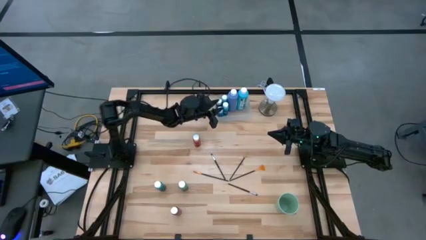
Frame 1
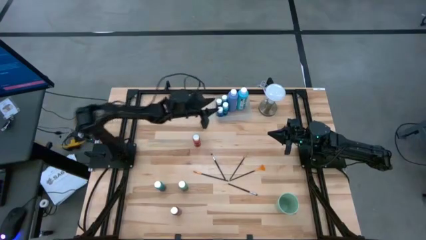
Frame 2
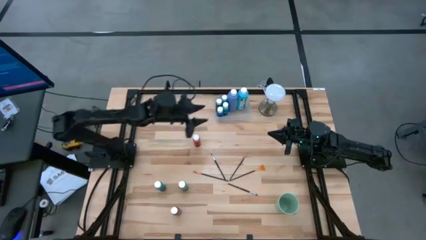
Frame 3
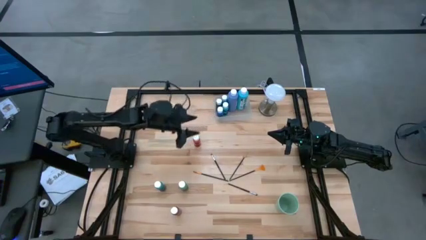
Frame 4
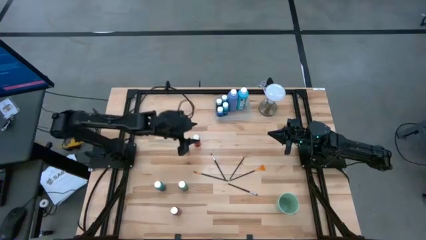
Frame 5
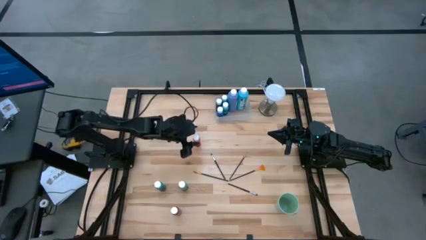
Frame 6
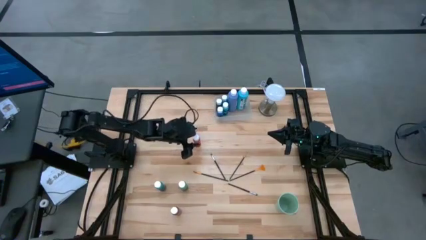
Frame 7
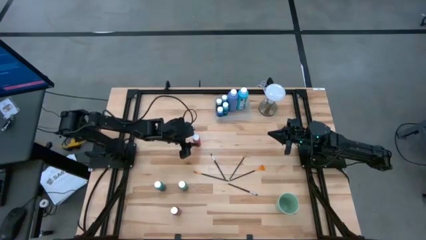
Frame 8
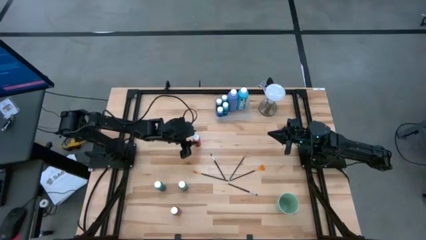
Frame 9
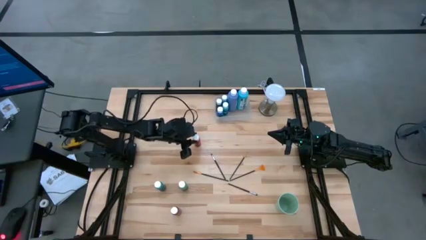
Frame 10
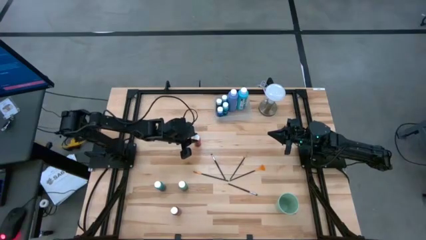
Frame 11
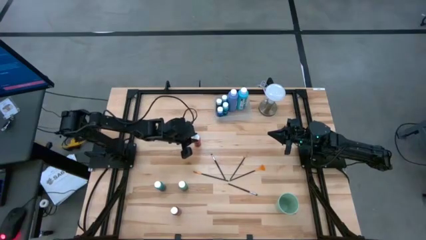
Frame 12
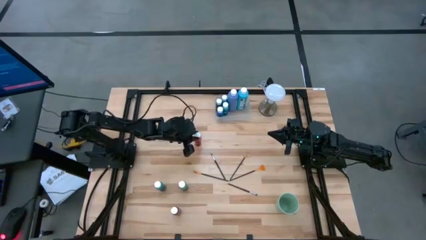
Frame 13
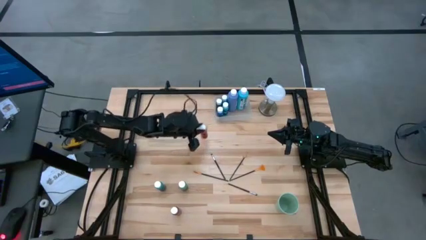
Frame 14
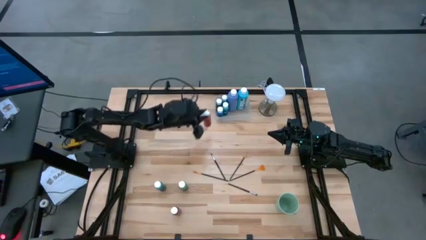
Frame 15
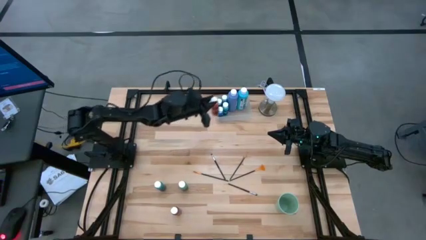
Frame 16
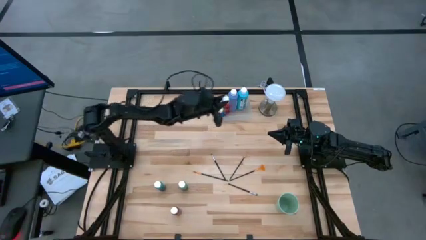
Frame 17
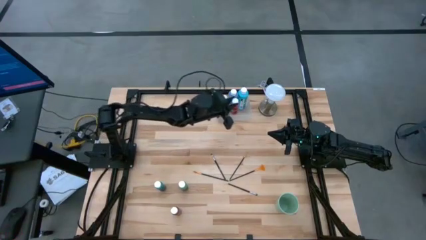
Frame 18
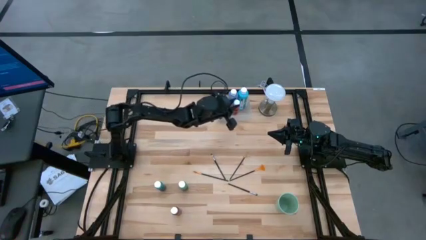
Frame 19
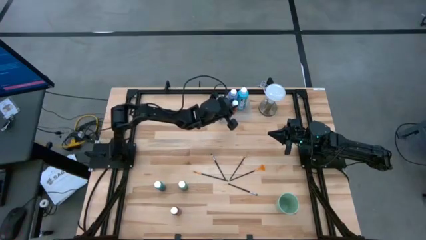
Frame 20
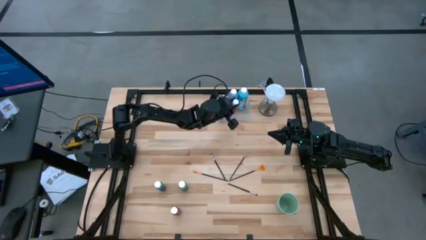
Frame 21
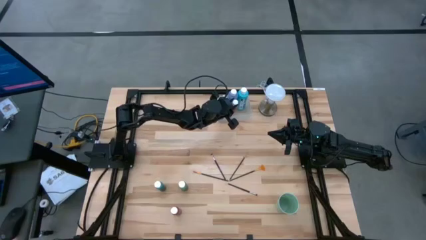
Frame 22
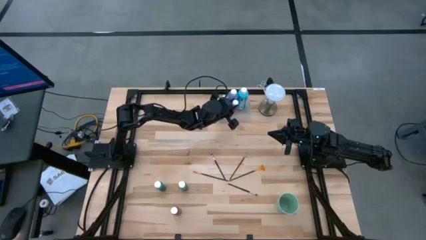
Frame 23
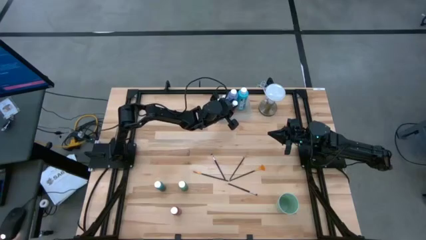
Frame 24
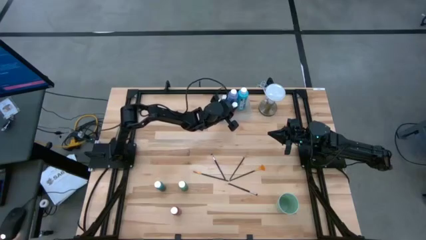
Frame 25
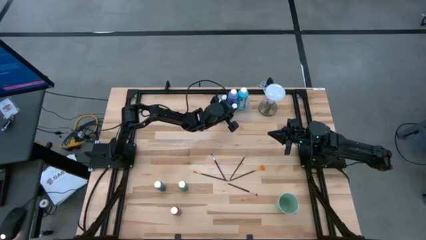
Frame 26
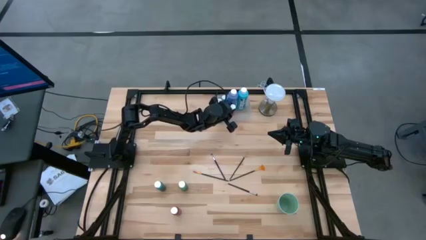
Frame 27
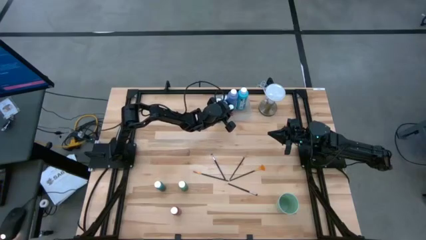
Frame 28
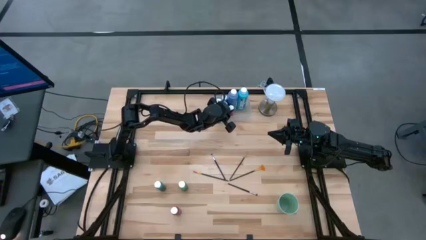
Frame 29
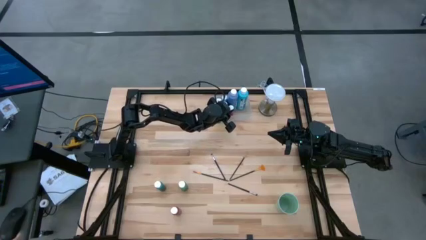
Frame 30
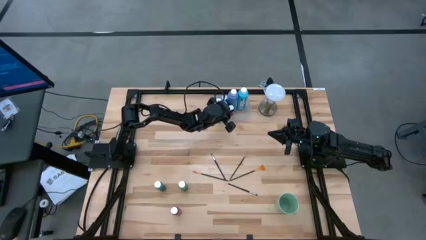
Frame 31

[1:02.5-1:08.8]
Task: Pick & Place Paint Supplies
Put the orange paint bottle into the transparent bin

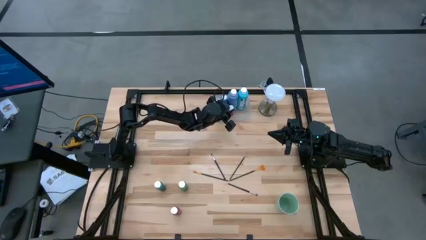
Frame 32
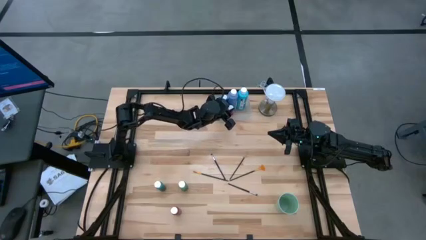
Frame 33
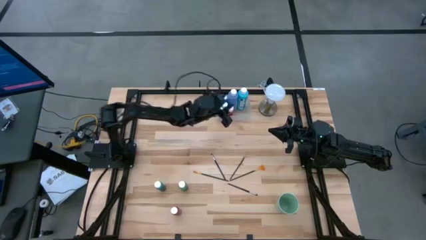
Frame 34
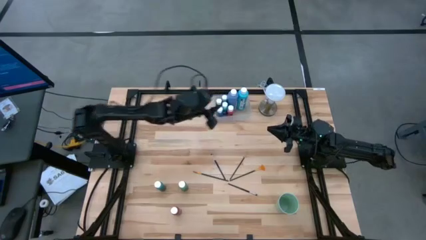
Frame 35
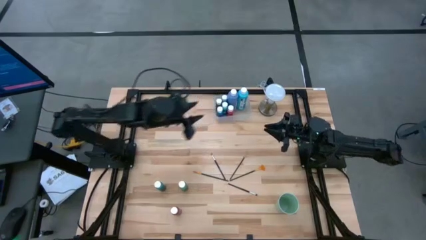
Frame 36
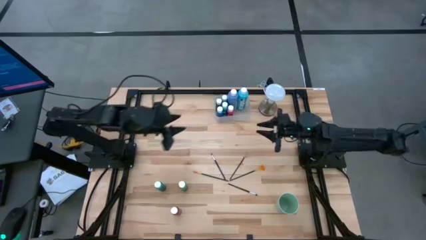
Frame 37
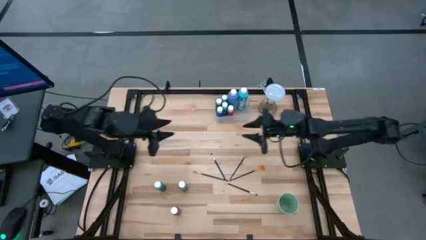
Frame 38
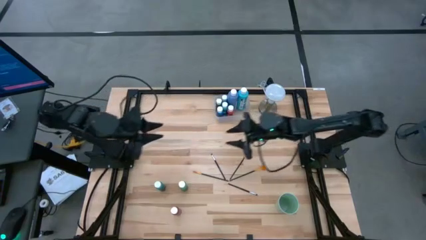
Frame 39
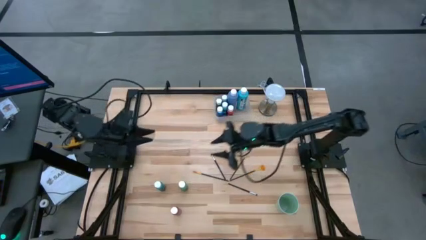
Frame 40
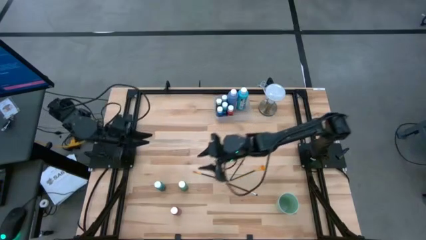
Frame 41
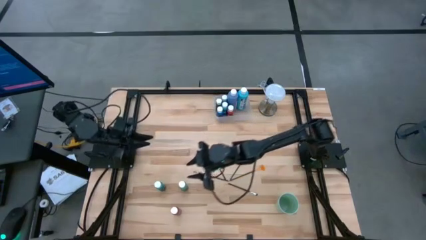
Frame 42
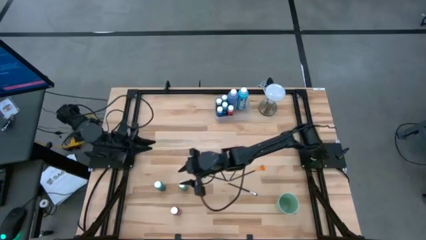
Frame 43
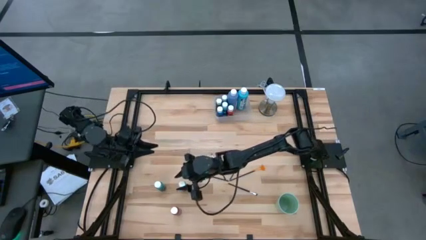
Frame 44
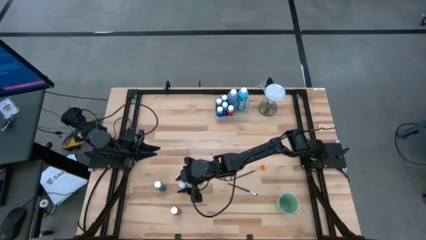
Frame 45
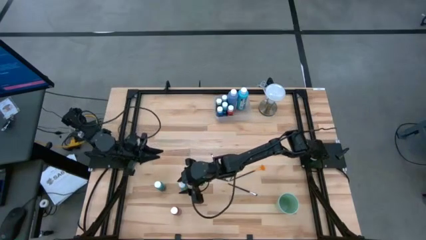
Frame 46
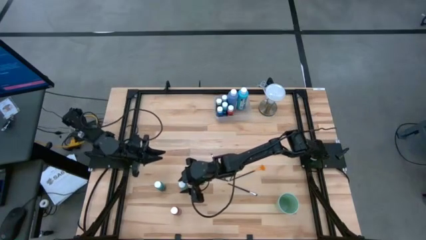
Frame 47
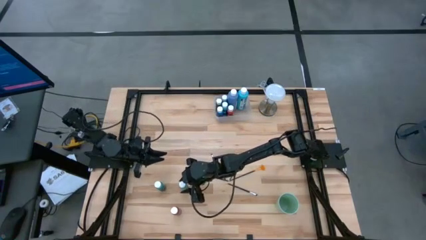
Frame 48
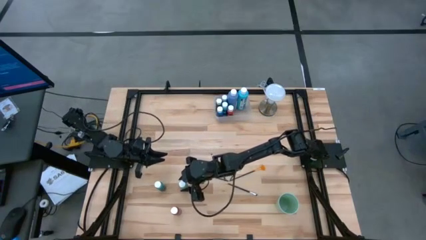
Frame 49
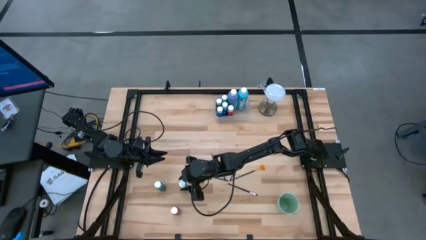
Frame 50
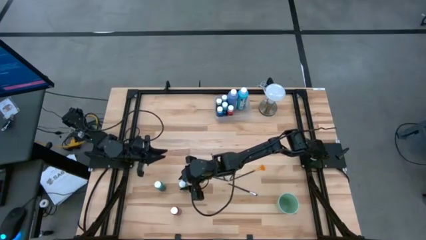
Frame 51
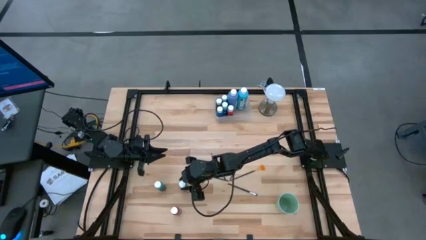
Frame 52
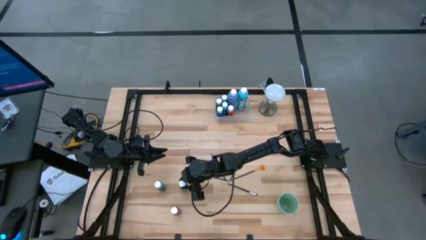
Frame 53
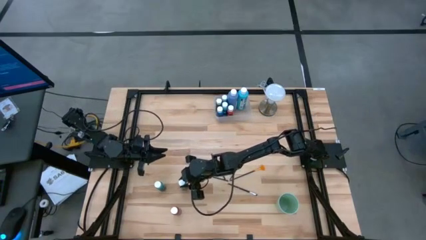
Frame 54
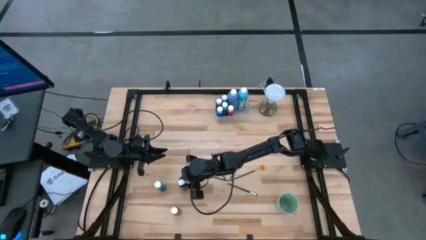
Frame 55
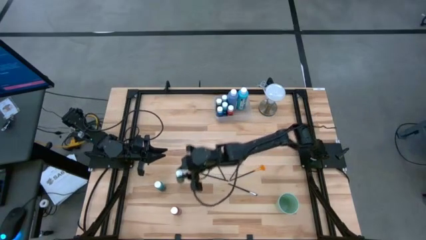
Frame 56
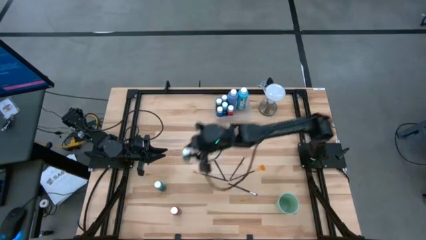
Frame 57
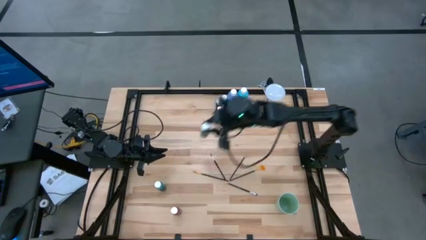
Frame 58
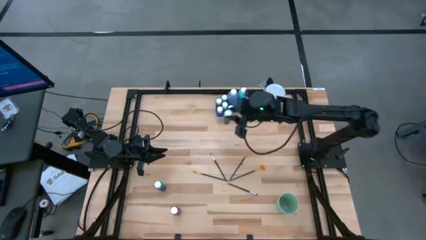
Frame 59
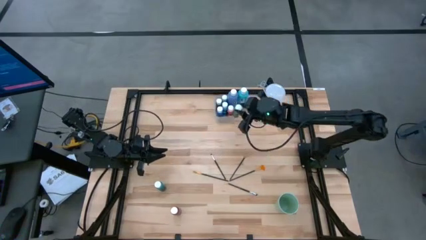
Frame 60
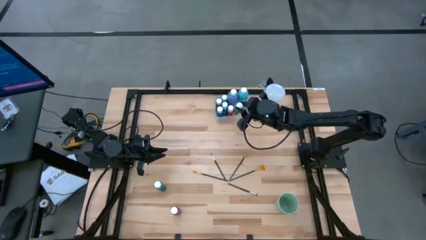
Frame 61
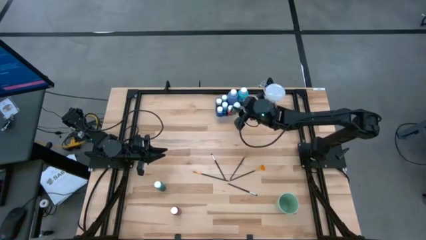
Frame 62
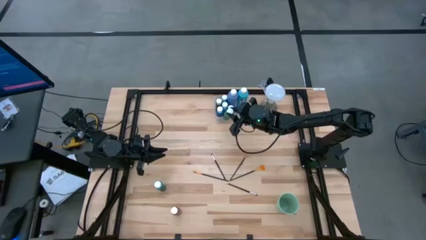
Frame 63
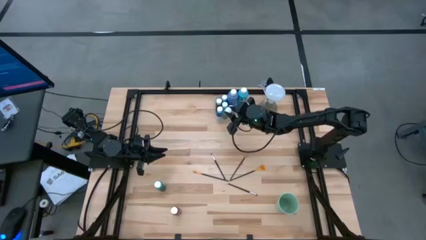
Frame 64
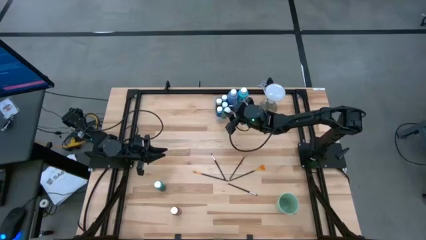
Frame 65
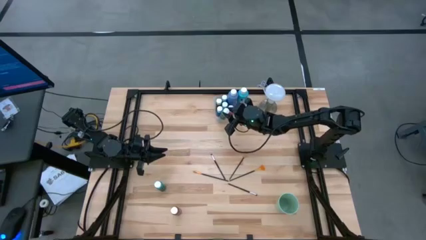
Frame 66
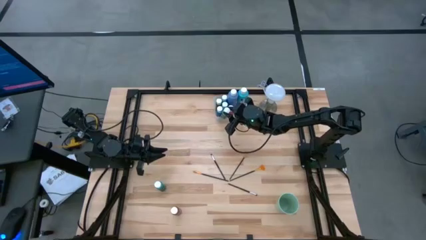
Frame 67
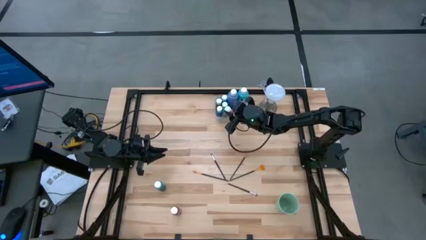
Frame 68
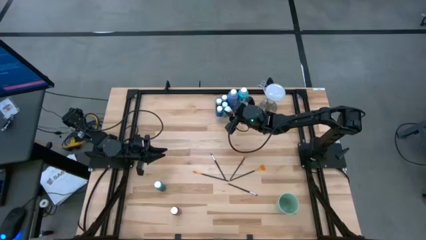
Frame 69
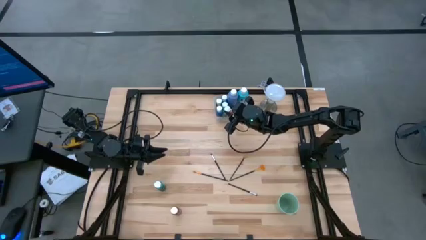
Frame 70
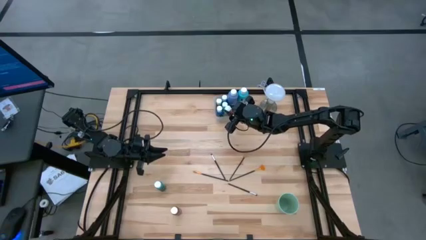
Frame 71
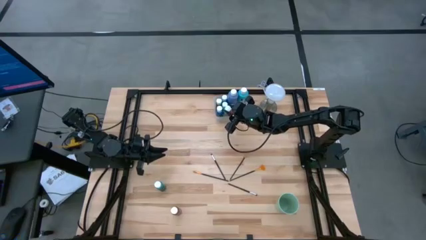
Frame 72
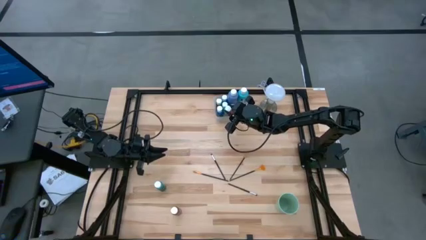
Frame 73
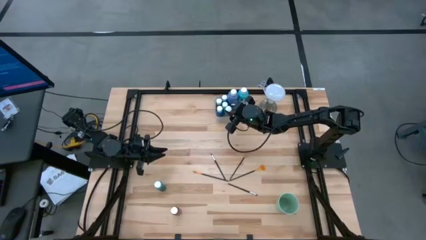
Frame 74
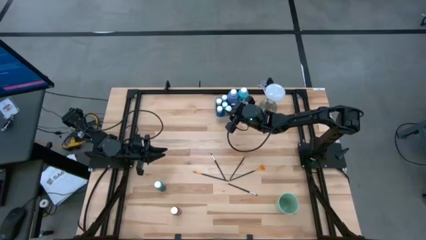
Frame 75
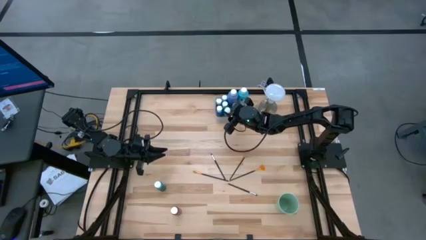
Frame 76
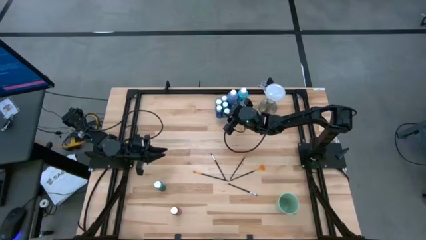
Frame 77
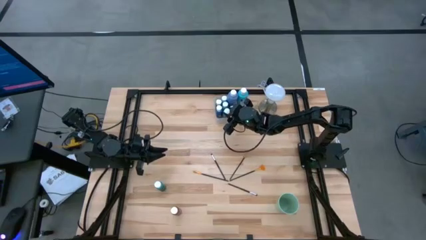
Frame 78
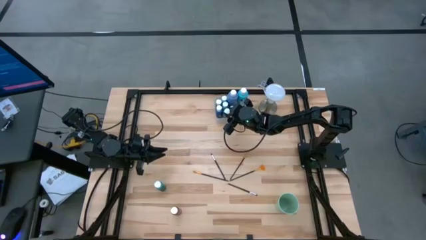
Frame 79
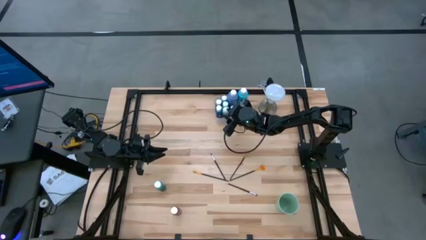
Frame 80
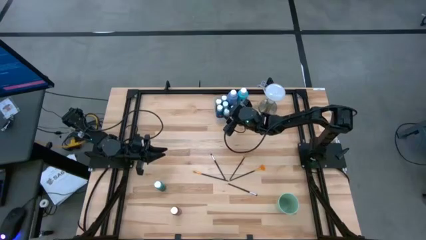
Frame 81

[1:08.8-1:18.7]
Put the green paint bottle into the transparent bin
